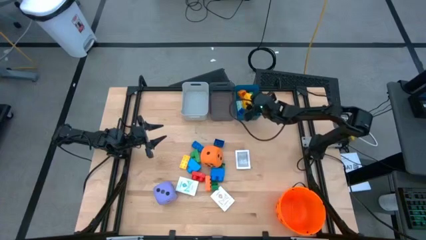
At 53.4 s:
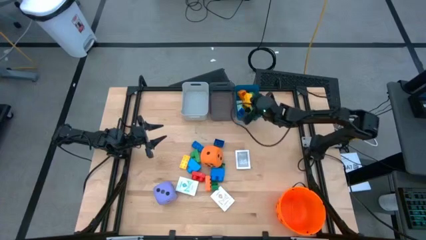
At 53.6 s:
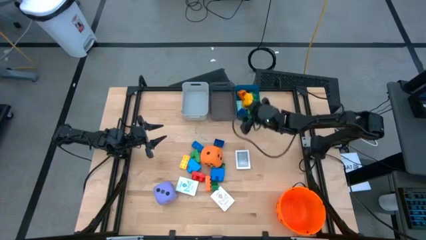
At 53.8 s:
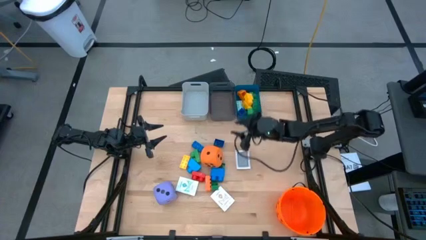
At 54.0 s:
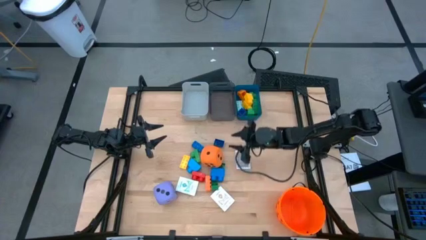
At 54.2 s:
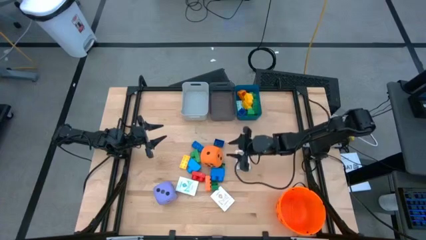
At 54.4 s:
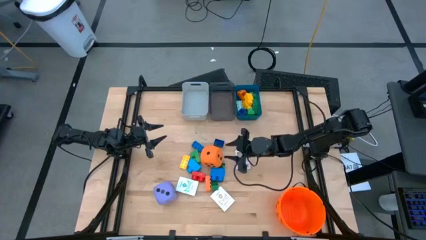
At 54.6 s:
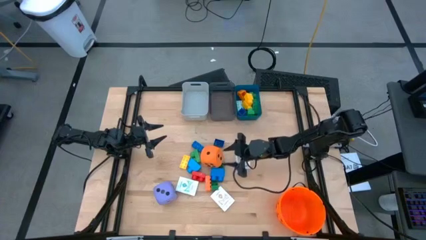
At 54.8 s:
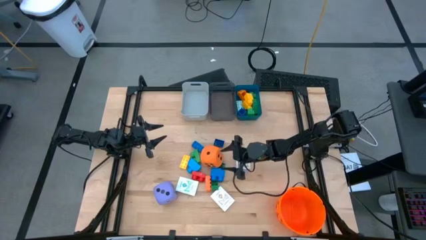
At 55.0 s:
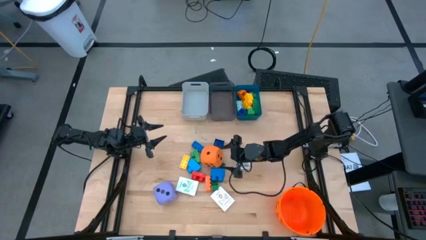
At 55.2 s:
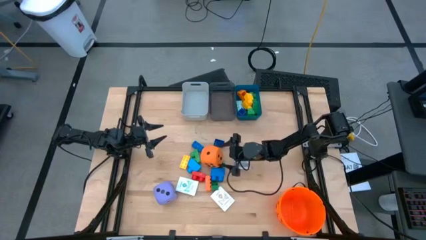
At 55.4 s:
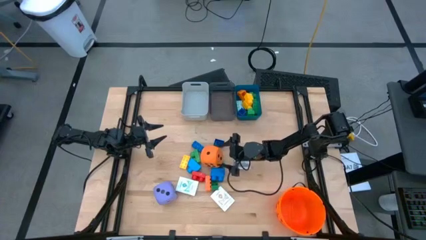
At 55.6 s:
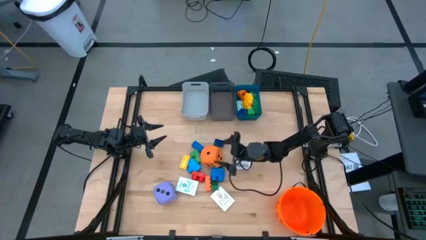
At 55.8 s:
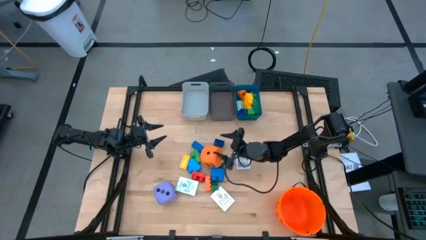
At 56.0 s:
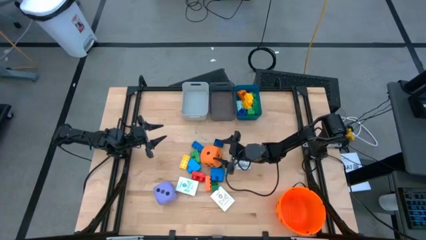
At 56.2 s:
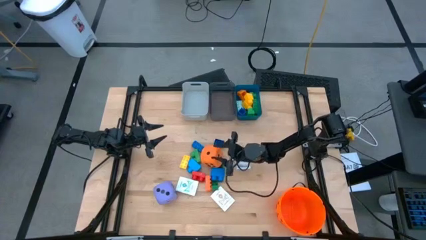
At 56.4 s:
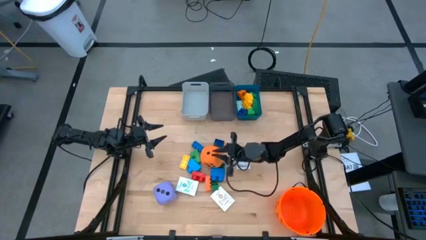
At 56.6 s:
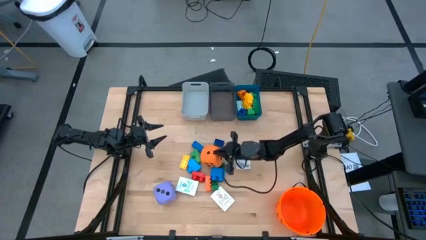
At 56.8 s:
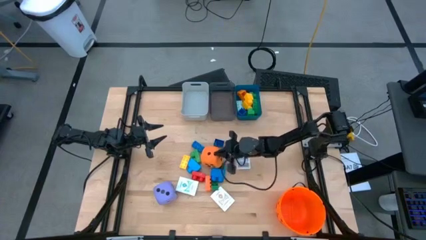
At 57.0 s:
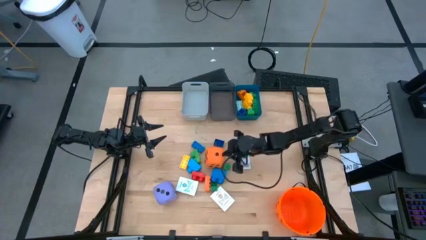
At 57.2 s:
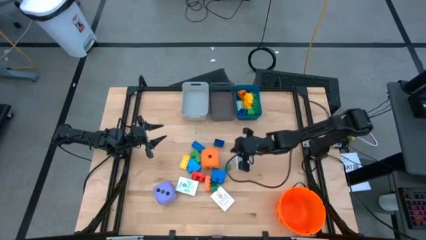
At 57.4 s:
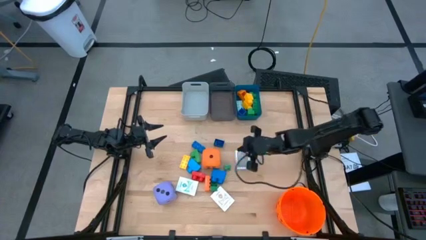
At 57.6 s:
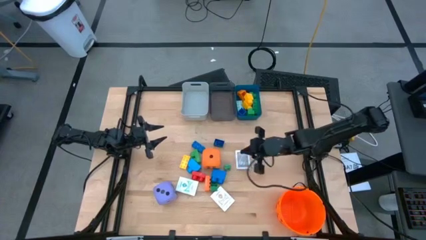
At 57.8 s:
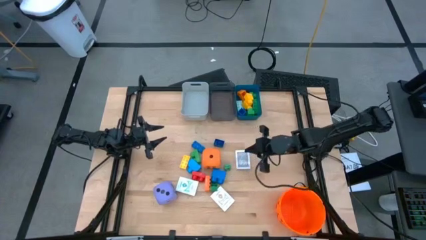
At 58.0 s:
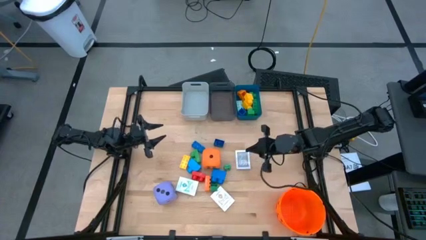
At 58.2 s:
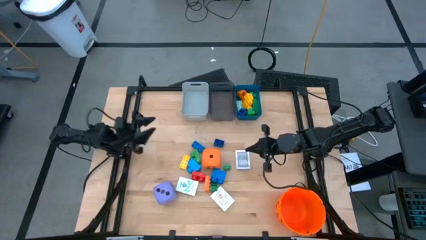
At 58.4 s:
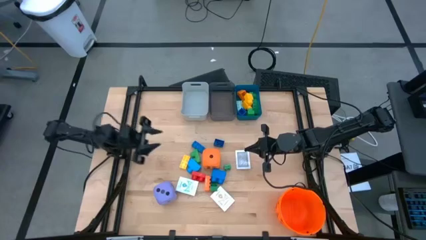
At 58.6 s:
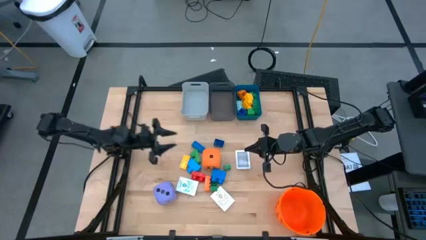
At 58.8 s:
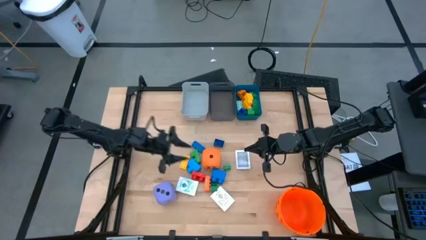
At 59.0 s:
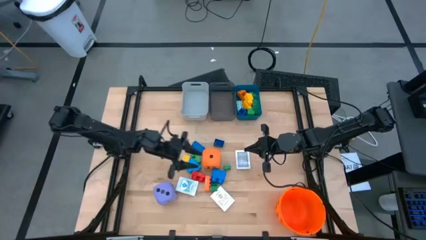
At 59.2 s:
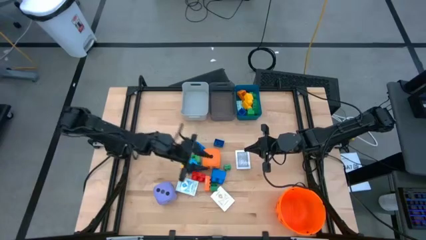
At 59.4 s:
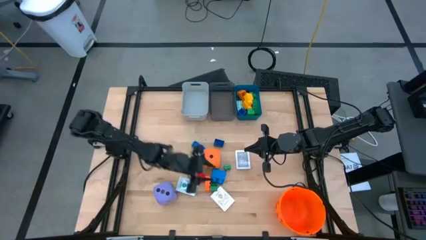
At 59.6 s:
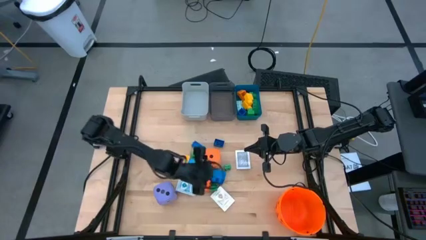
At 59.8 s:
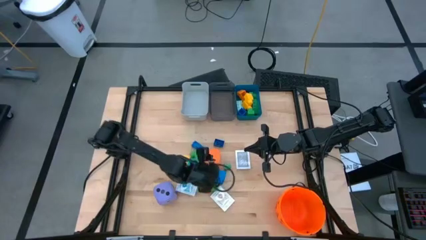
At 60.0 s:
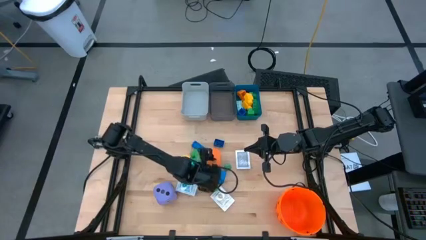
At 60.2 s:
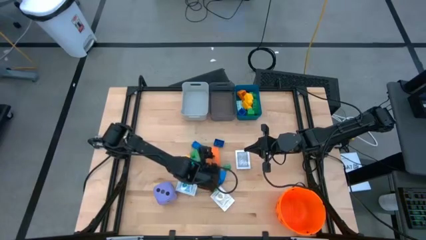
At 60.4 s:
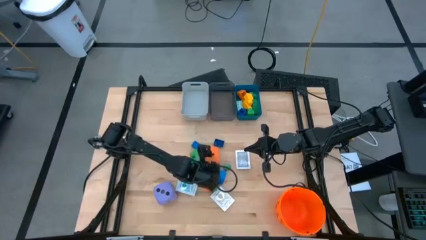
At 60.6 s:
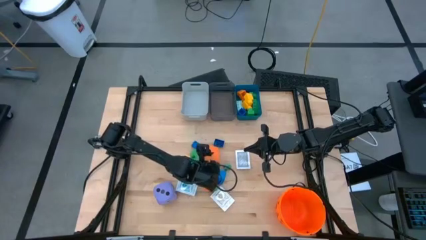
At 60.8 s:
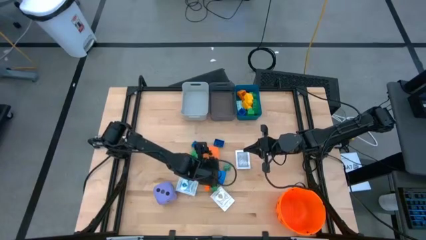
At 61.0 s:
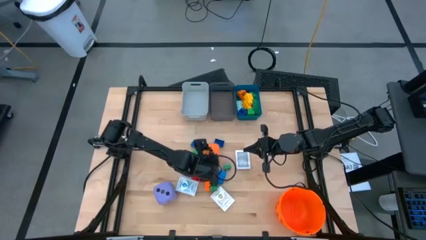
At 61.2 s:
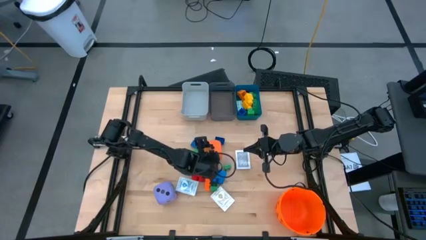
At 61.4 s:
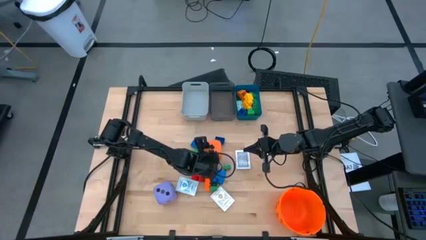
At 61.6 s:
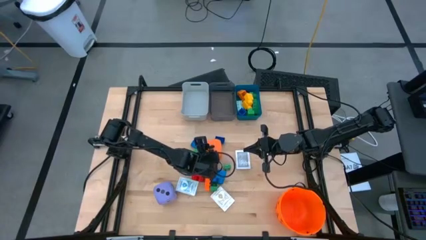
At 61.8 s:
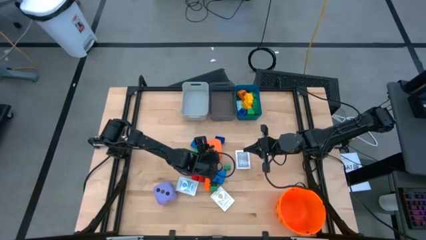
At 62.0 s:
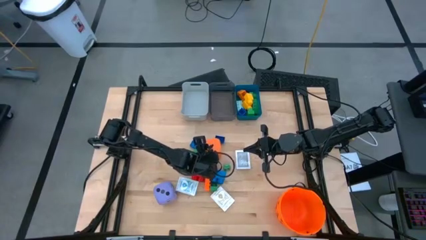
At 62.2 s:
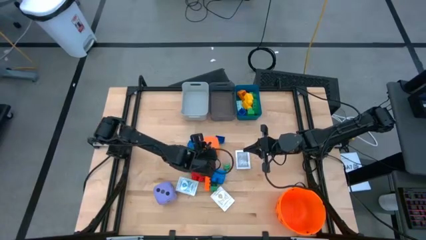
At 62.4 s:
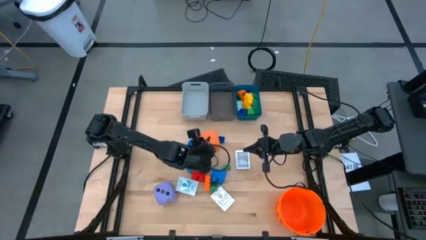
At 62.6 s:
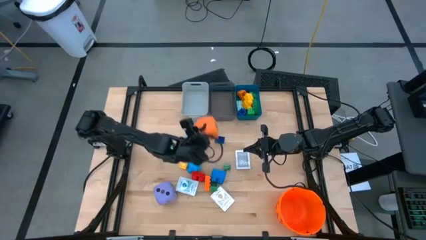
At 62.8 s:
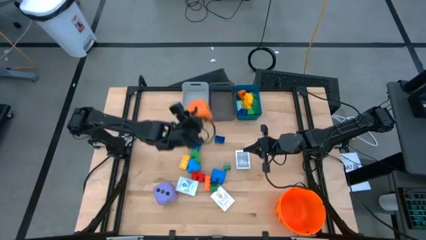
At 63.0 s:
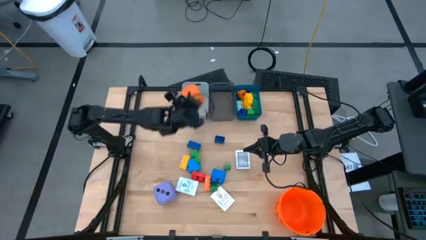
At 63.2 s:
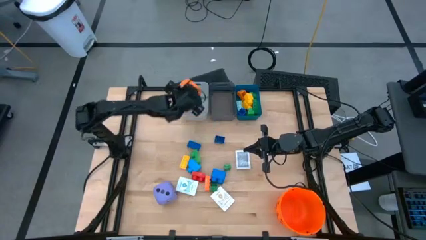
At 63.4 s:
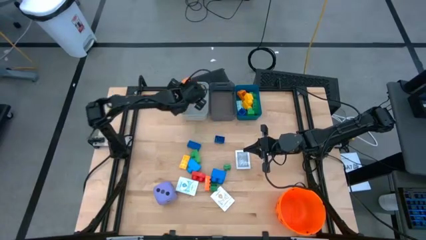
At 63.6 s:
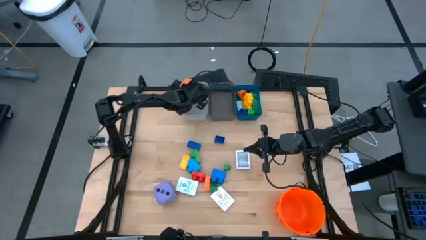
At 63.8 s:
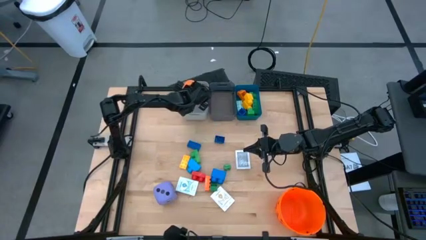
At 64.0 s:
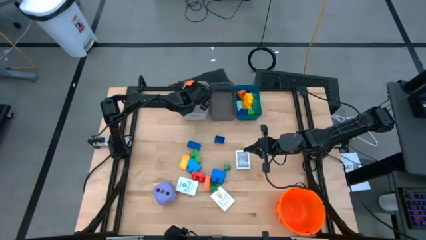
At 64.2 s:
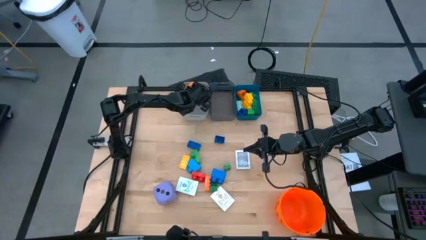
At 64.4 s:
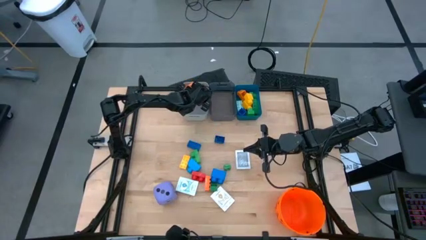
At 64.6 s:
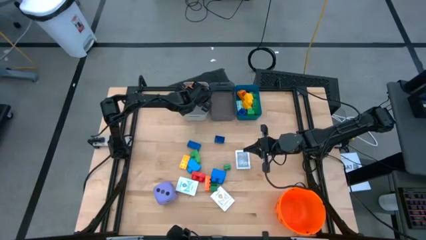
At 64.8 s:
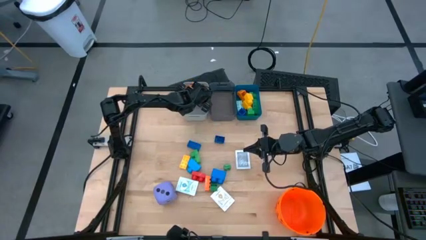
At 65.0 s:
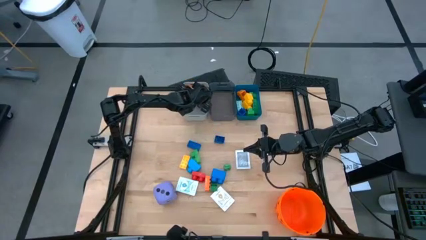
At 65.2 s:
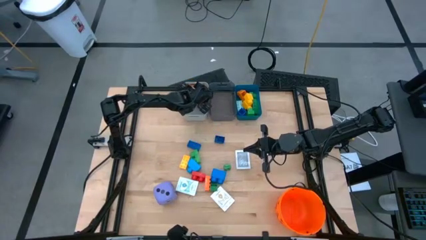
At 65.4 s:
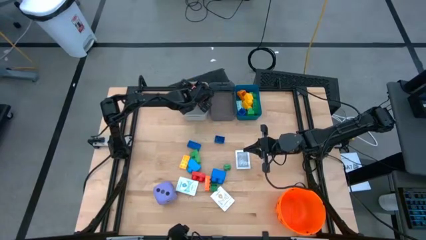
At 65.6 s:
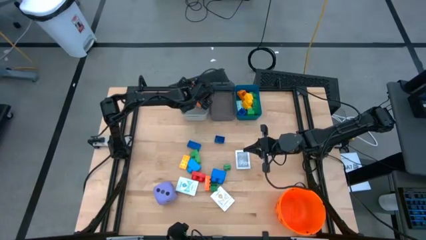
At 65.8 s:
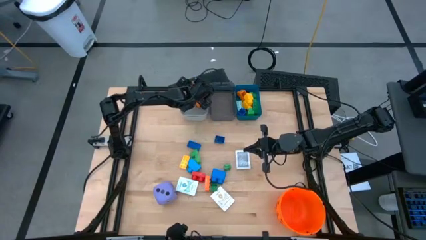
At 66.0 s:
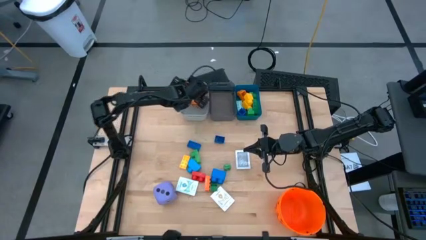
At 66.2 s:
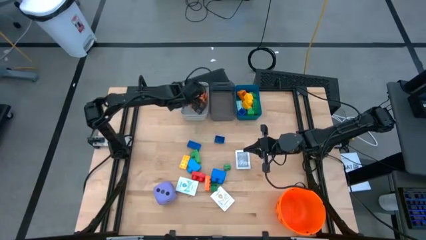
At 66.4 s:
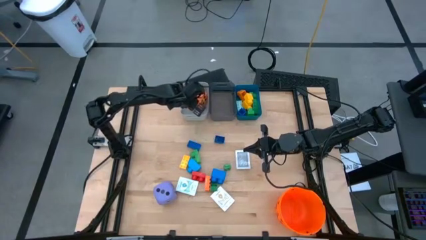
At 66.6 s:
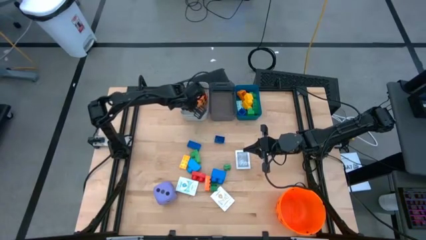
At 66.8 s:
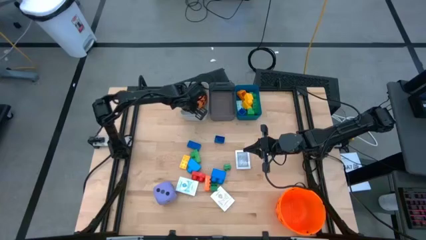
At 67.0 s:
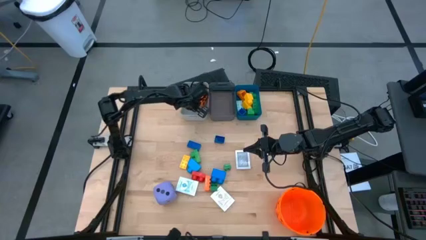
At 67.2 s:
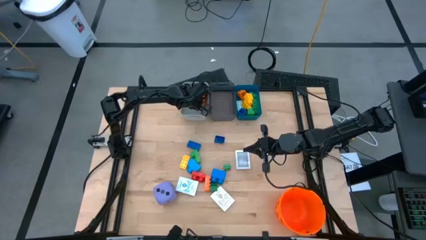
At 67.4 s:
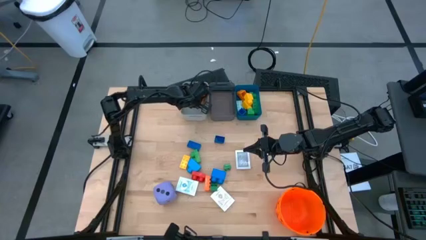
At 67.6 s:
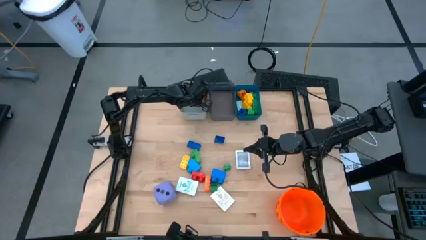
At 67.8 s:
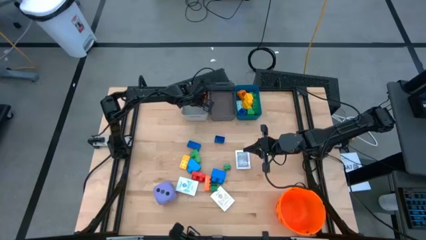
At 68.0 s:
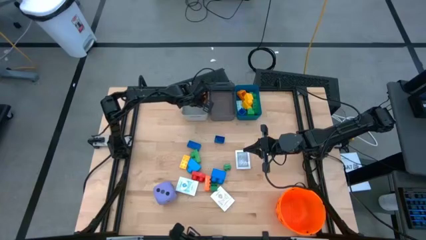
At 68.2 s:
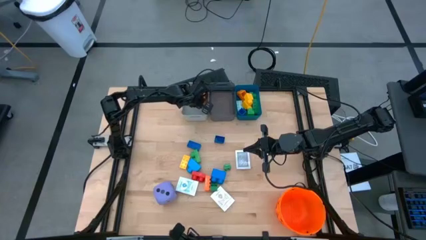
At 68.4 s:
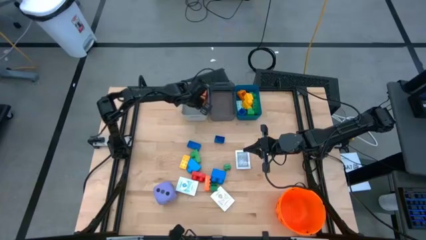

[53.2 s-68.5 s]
Task: Pick & Place Toys
Put the orange die into the white bin

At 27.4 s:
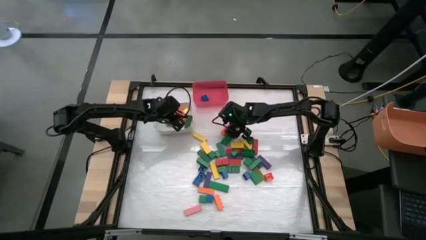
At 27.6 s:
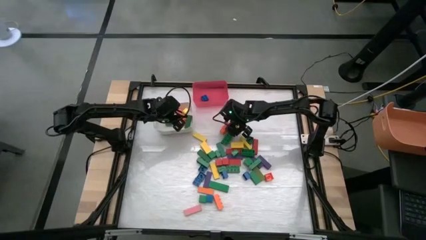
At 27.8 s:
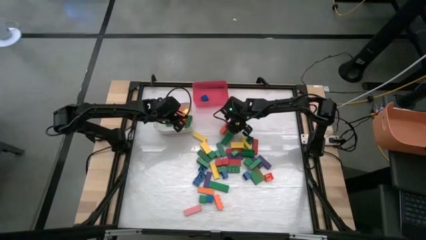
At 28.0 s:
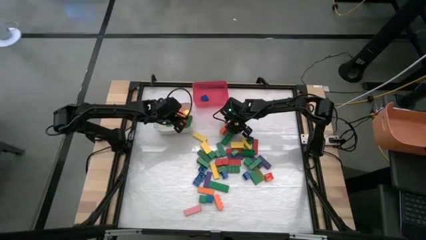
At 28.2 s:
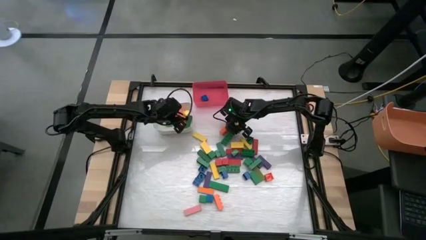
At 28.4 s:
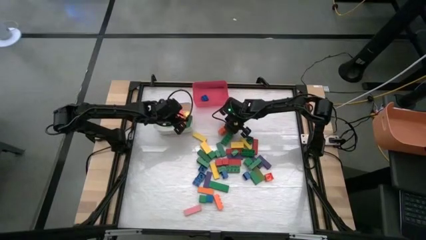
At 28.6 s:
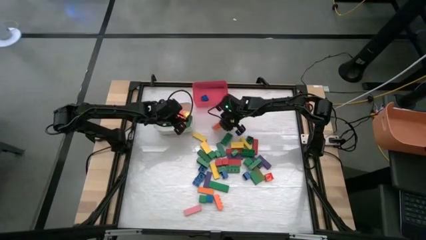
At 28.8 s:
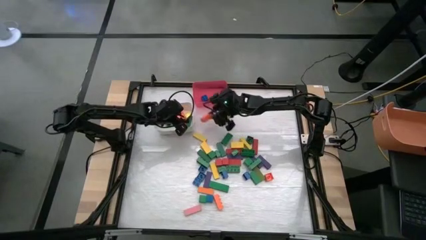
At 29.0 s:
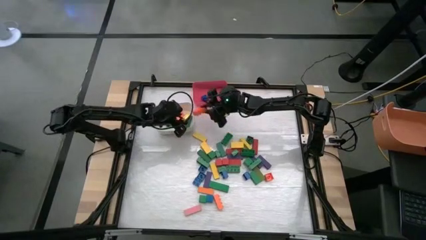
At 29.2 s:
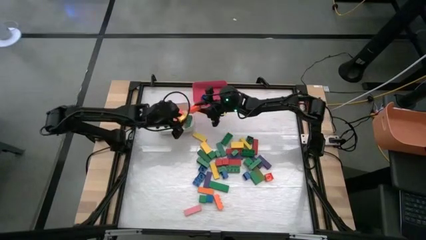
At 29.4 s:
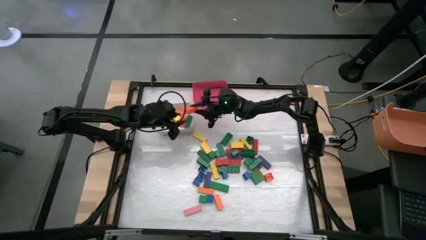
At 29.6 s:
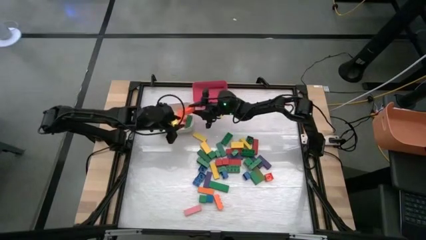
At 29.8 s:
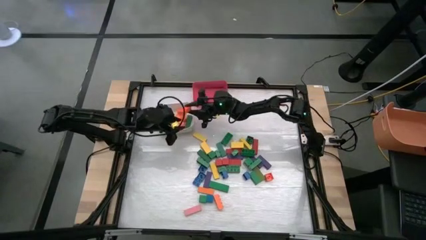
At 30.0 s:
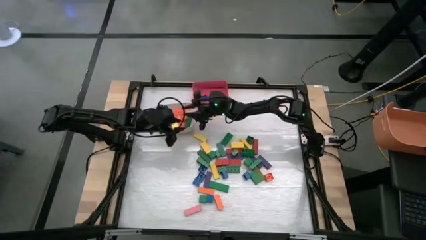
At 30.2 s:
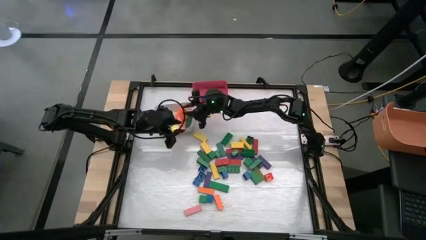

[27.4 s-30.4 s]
Task: Sort blocks by size
Put the large orange game piece into the white bin
